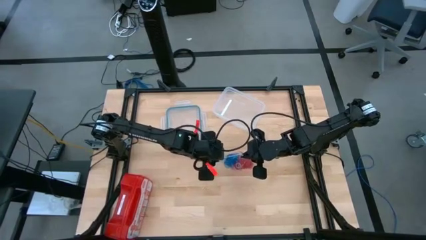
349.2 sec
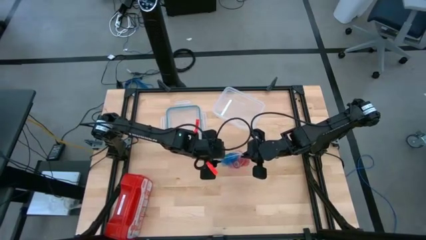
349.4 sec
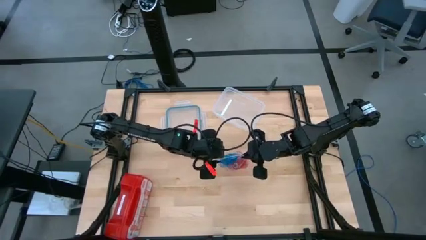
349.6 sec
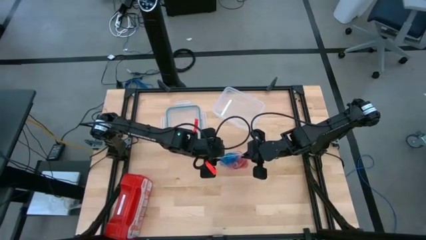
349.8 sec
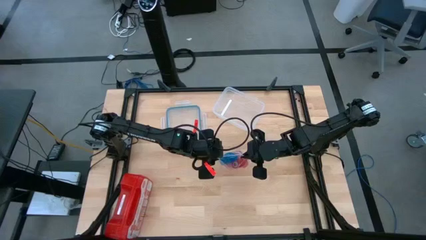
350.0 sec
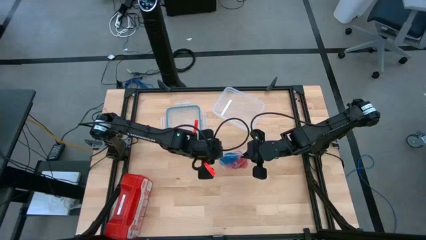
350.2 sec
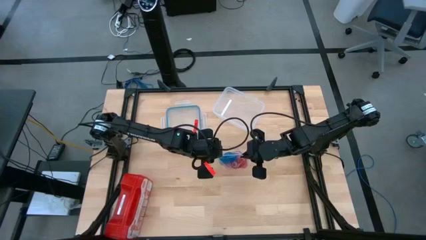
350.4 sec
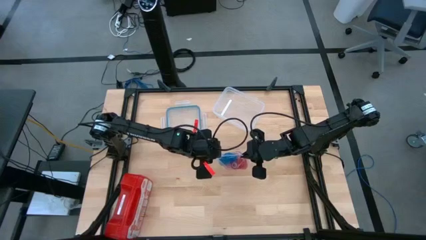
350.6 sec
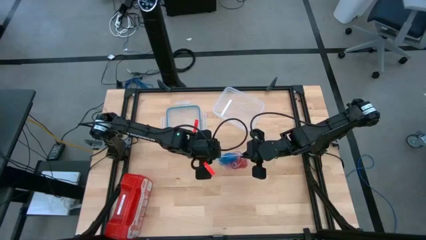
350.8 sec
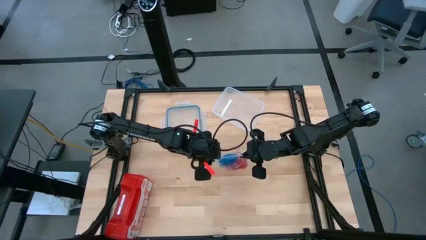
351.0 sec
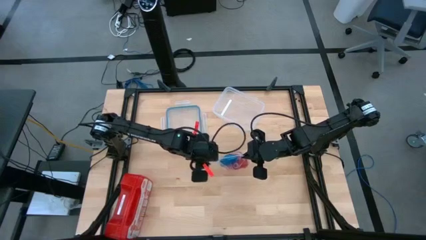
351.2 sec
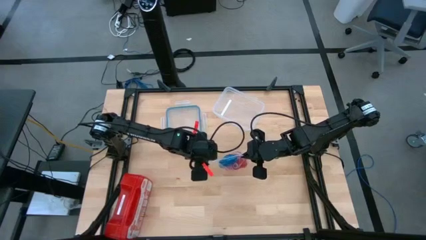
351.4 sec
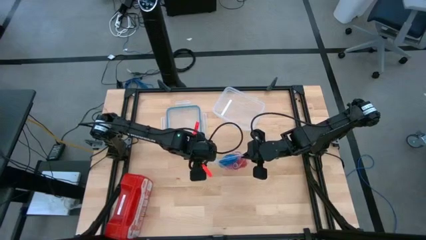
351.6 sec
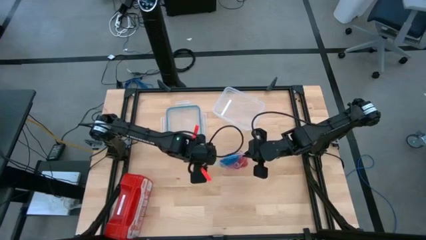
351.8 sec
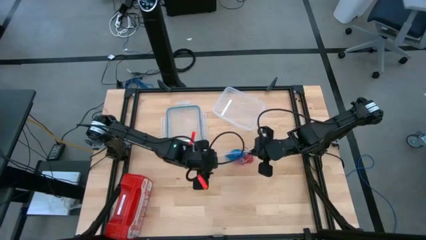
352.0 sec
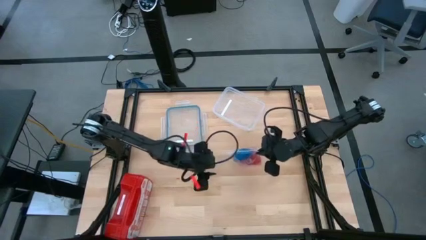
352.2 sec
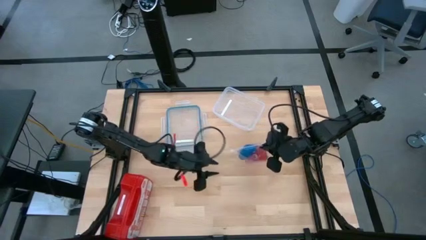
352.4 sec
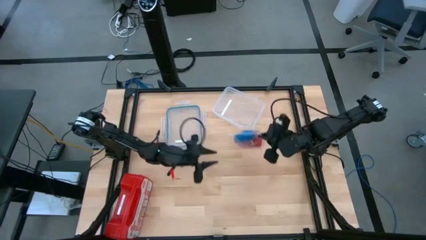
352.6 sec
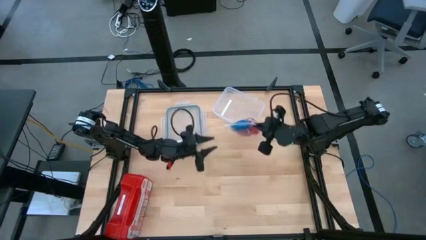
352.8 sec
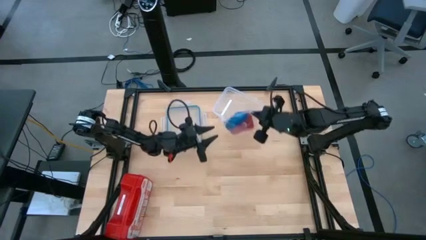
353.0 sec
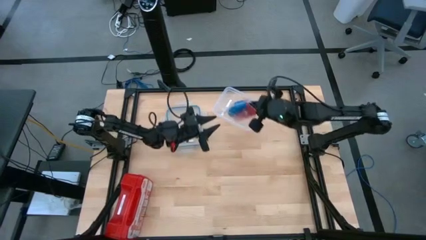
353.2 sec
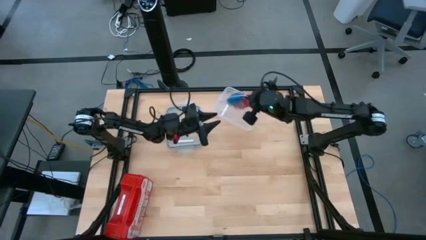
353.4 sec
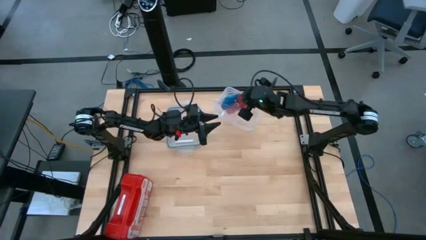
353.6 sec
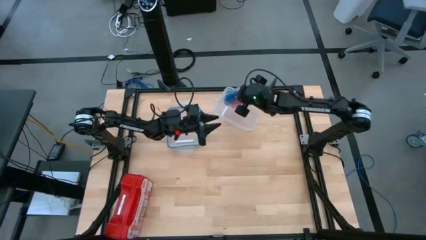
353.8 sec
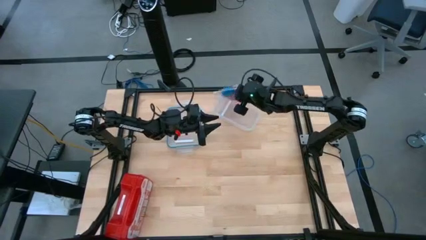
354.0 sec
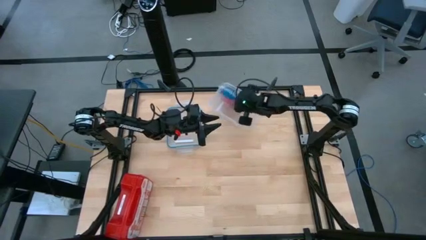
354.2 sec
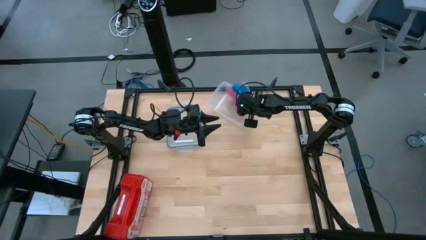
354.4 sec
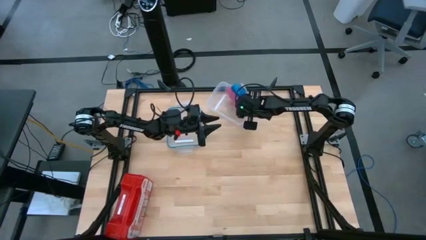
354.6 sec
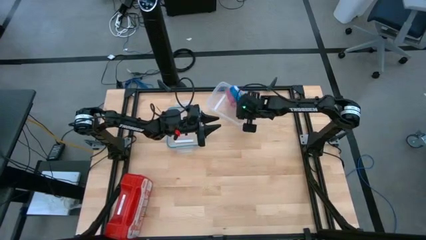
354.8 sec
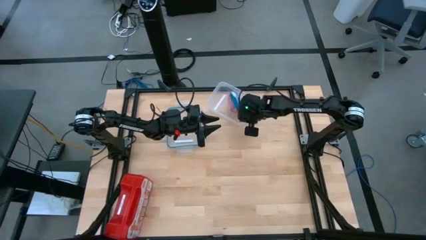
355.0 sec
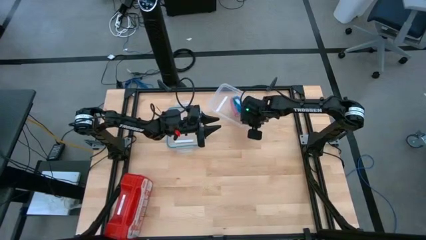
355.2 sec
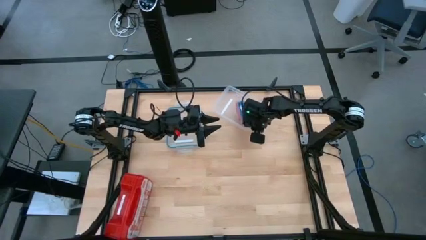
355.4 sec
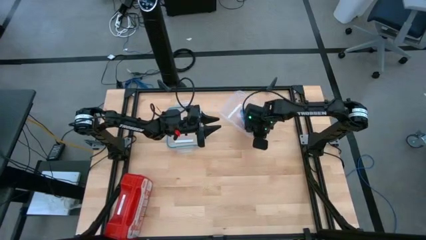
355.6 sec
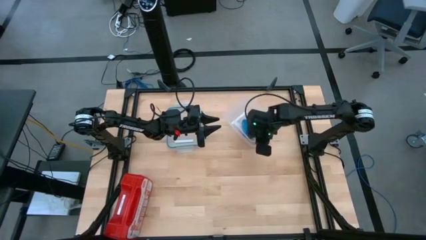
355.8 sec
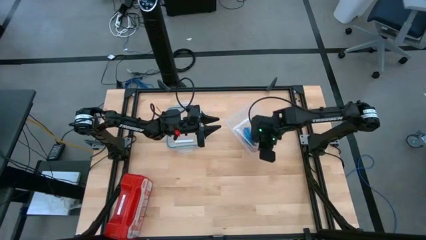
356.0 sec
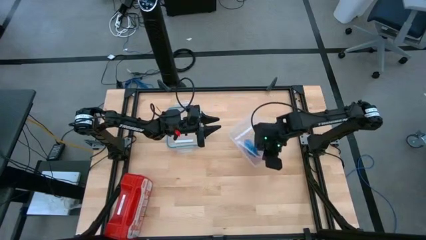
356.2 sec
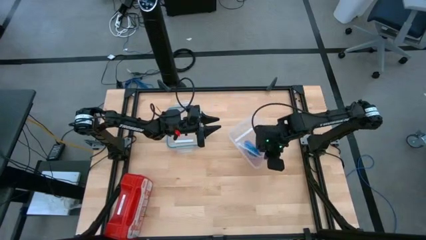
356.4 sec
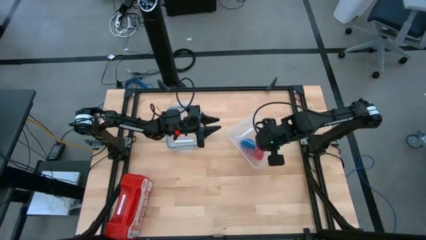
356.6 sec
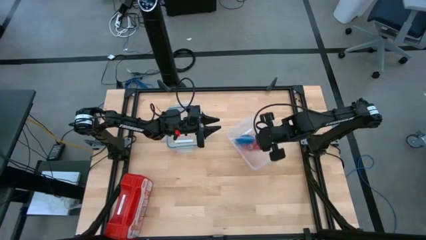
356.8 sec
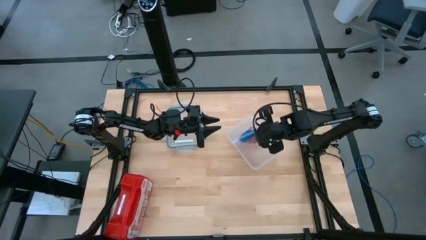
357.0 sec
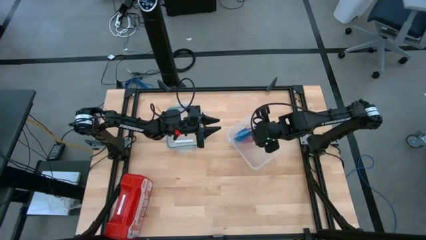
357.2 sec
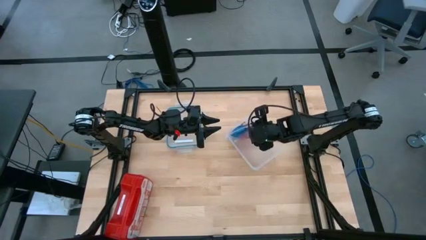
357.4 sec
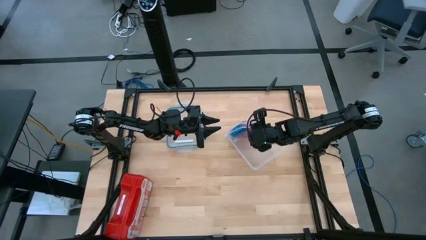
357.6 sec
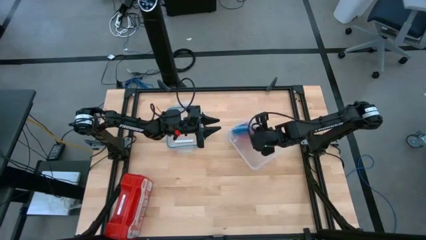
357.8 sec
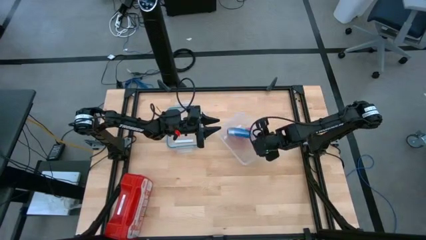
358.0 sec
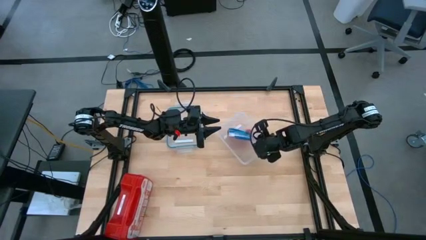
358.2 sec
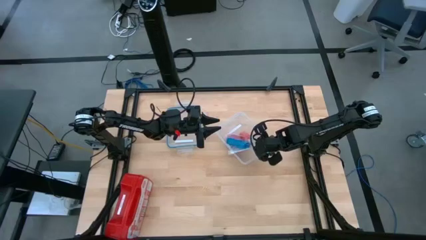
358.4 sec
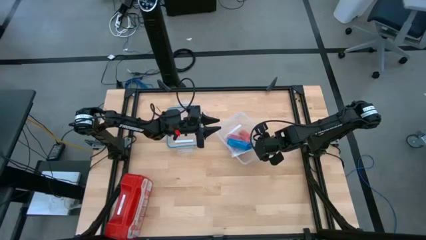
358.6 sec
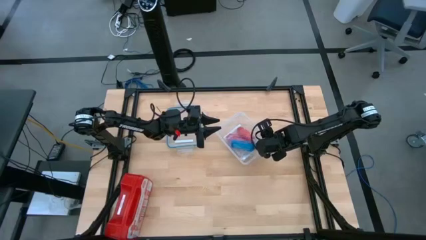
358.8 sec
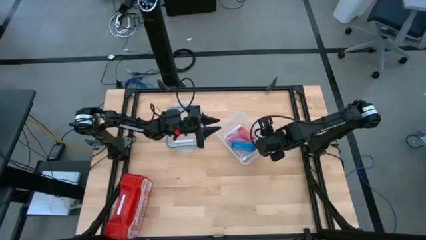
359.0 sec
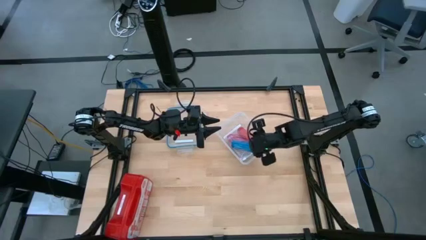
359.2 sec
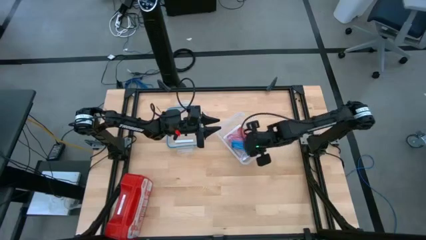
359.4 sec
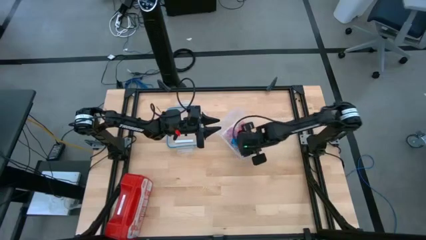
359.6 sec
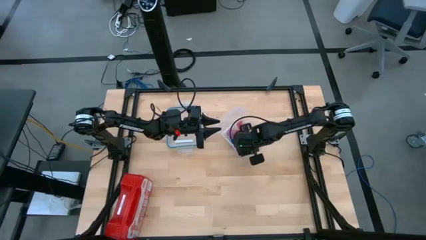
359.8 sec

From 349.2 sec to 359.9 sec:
Task: Roll bandage
Put the transparent zip bag into the transparent container

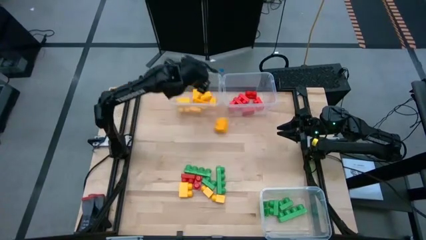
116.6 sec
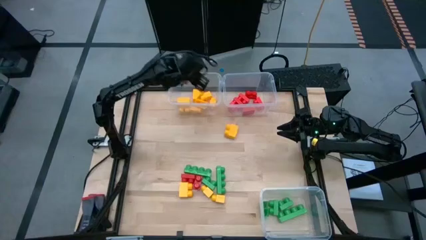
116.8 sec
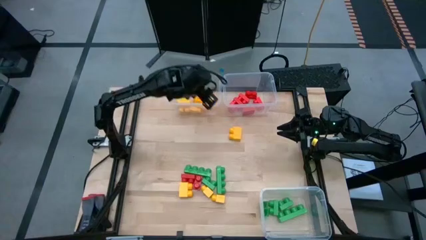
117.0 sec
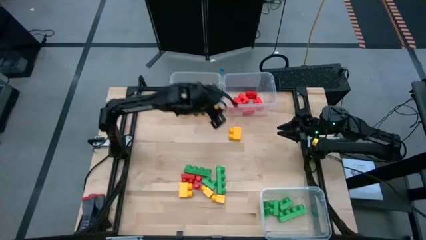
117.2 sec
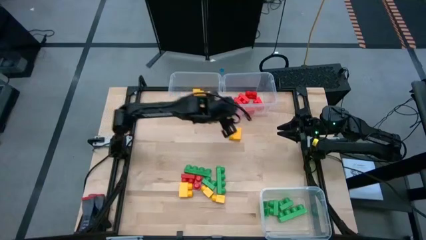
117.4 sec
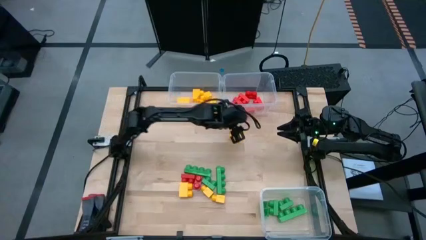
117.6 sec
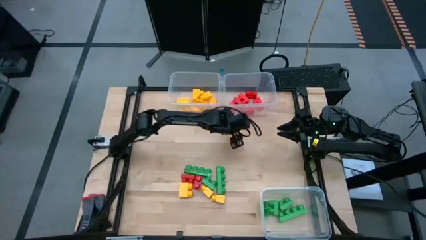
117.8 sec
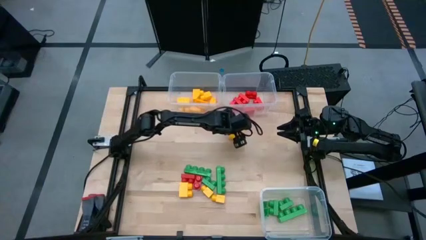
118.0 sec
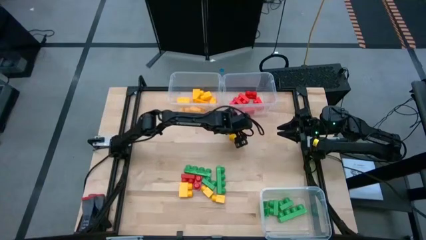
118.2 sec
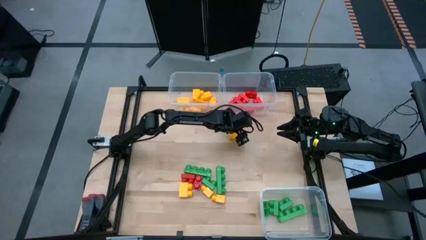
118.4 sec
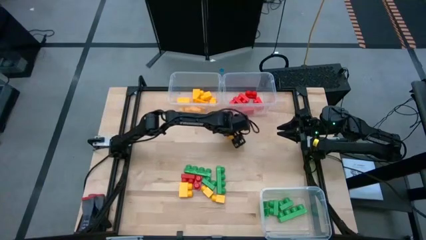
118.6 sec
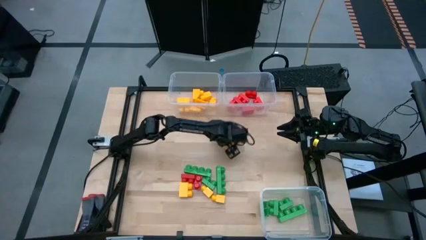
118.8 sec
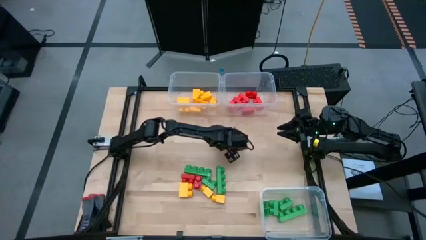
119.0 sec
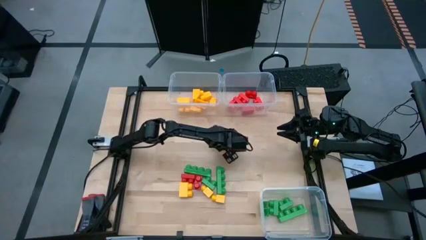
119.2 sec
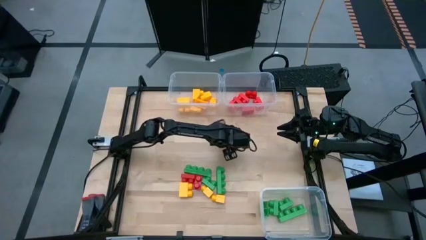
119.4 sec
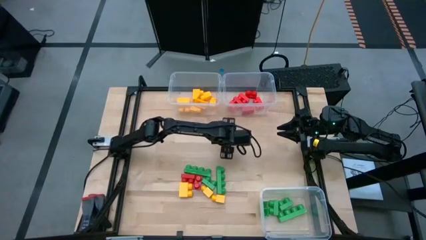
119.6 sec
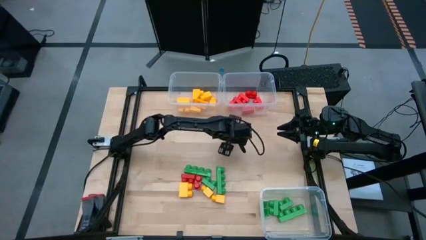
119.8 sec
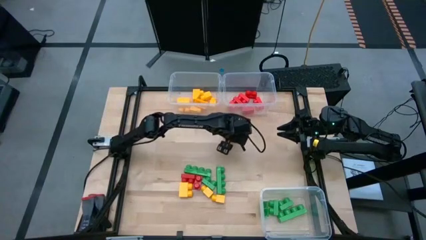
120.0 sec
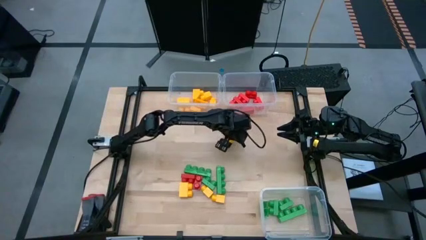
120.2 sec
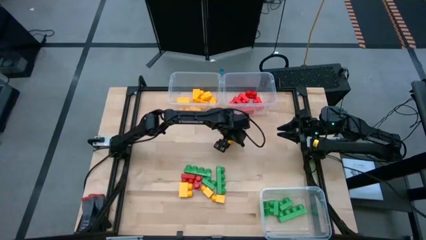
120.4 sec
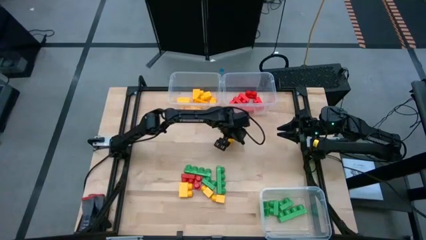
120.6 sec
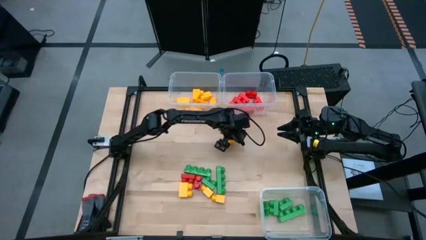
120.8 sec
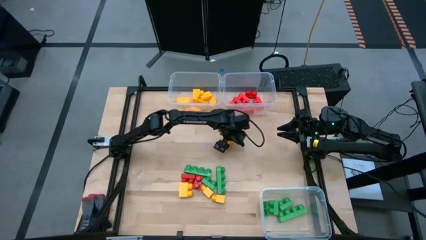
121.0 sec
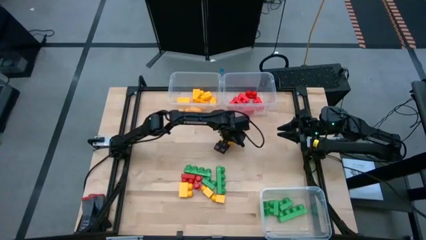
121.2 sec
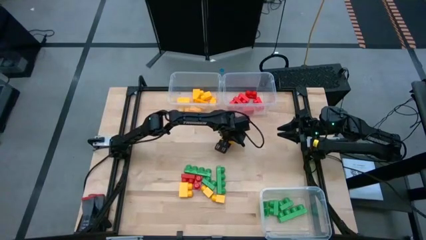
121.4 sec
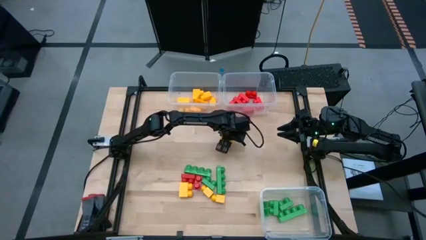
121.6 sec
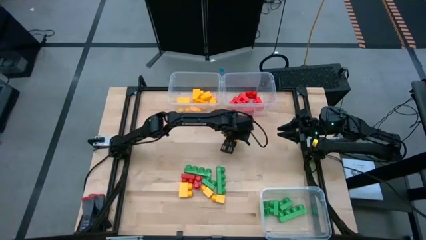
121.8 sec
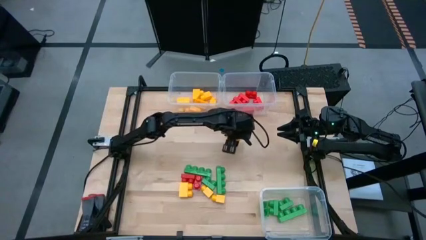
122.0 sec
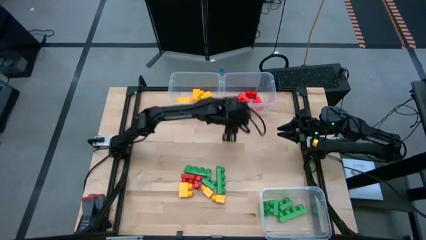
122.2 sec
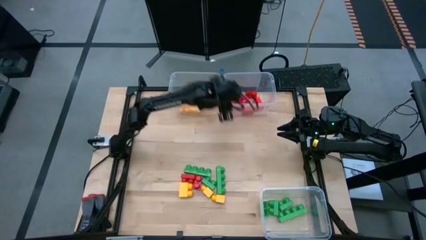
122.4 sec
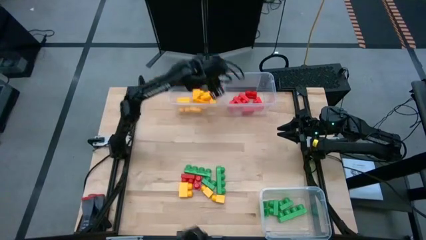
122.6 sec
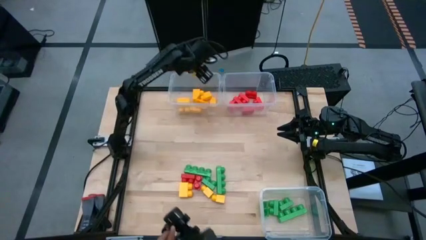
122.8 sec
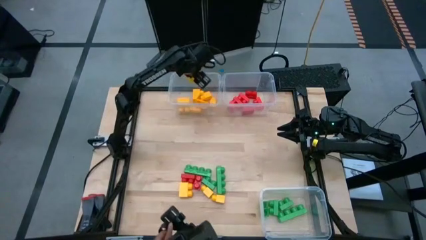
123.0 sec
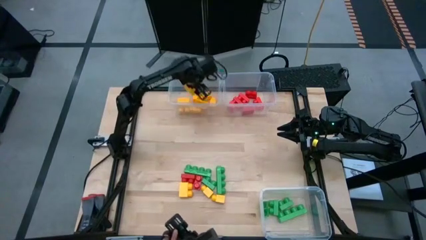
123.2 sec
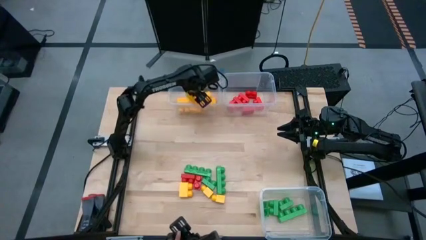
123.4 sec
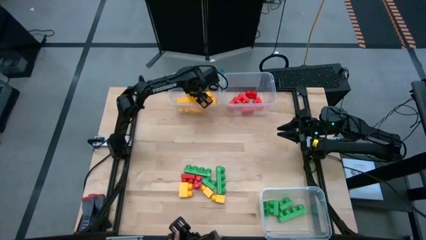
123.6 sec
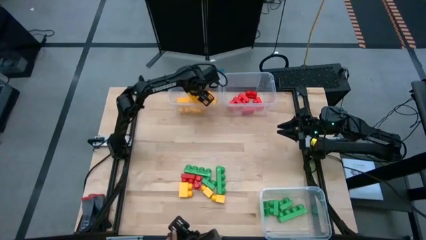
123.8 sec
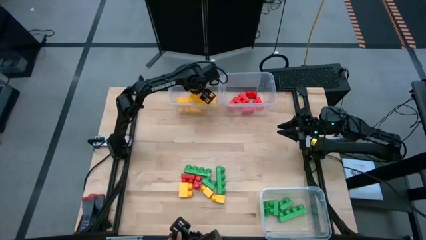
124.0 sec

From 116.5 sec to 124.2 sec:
Task: Sort blocks
Put the yellow game piece into the top left transparent bin
